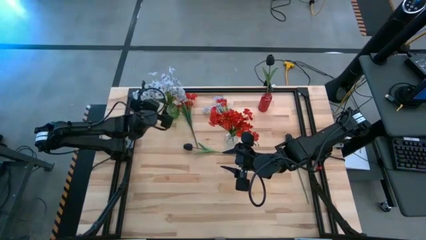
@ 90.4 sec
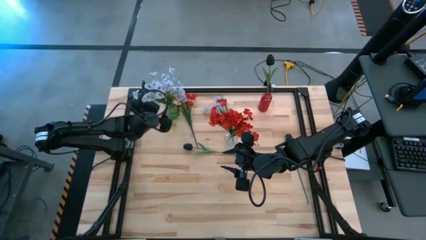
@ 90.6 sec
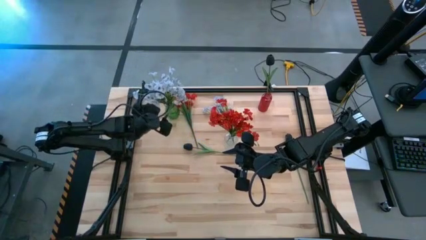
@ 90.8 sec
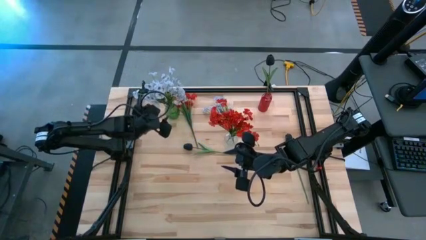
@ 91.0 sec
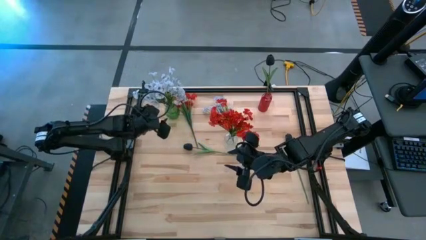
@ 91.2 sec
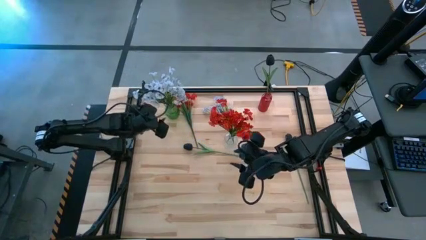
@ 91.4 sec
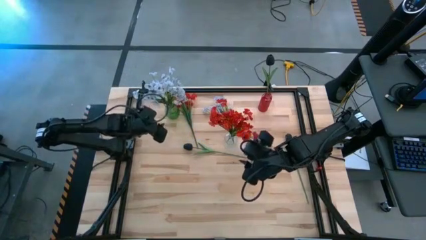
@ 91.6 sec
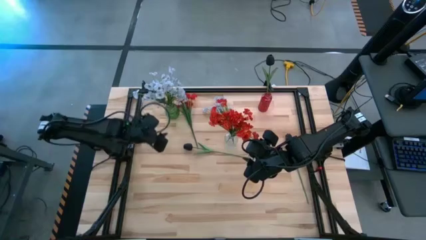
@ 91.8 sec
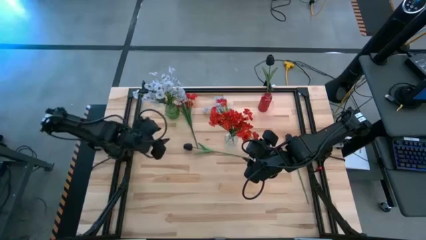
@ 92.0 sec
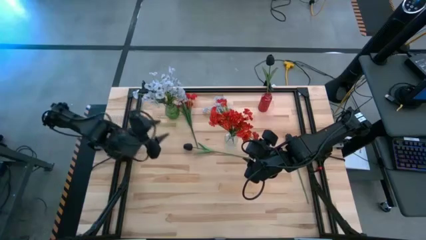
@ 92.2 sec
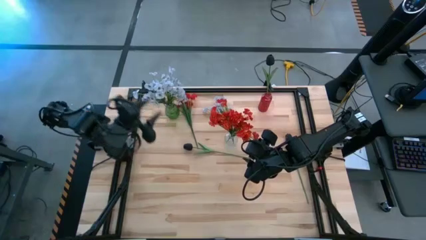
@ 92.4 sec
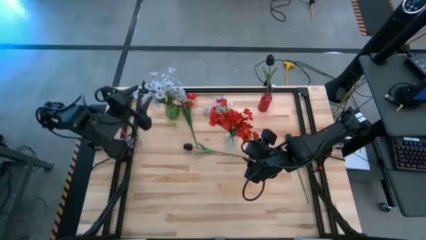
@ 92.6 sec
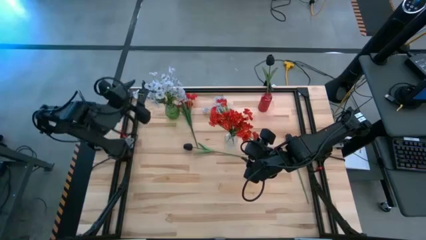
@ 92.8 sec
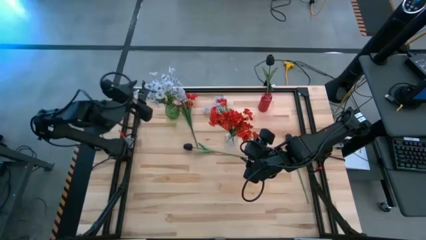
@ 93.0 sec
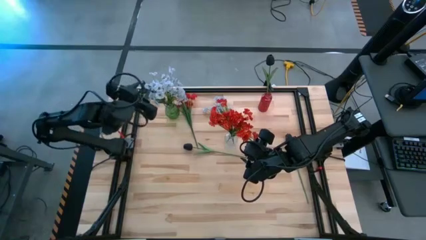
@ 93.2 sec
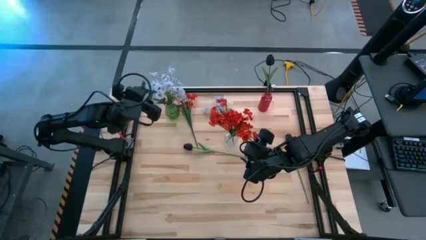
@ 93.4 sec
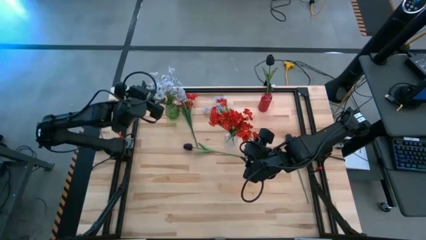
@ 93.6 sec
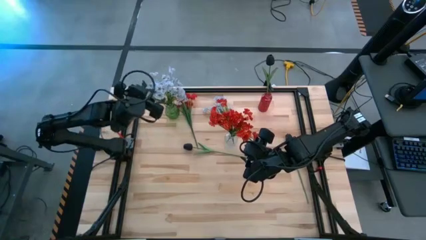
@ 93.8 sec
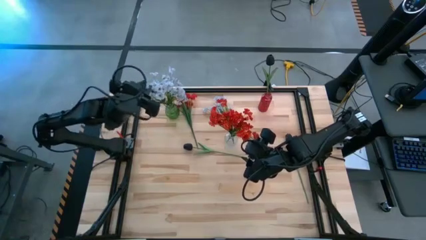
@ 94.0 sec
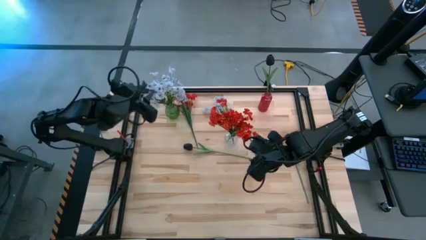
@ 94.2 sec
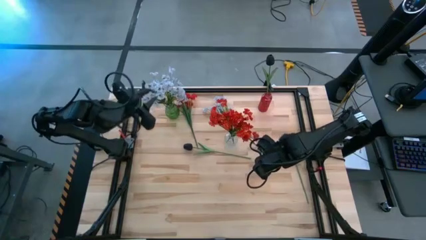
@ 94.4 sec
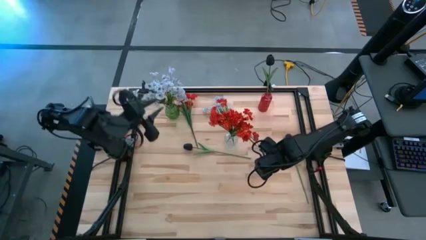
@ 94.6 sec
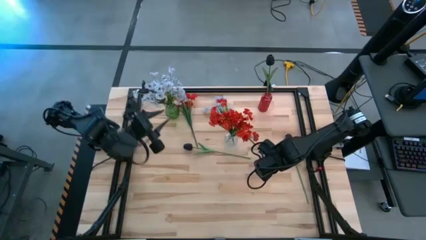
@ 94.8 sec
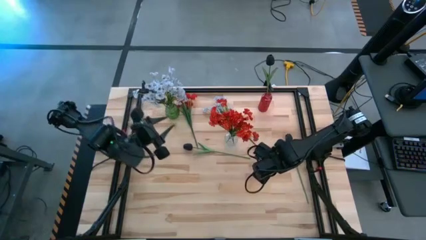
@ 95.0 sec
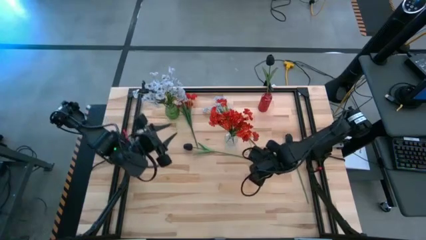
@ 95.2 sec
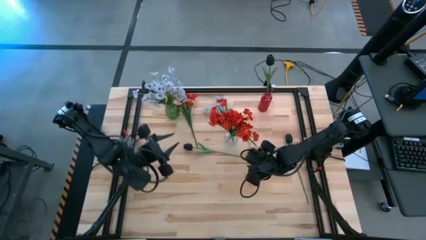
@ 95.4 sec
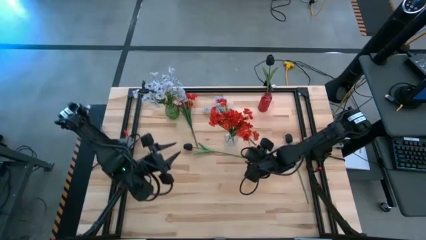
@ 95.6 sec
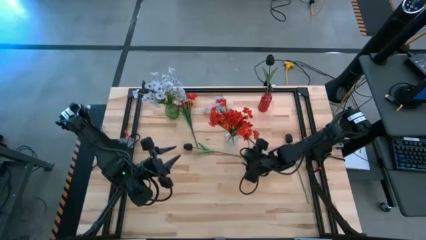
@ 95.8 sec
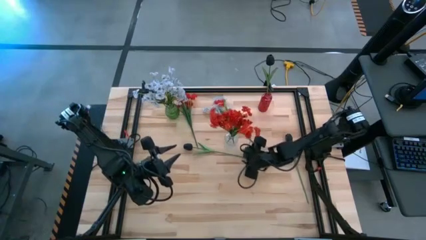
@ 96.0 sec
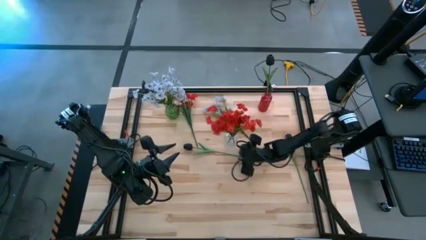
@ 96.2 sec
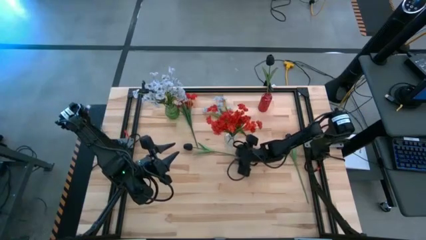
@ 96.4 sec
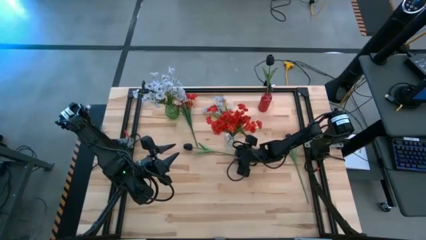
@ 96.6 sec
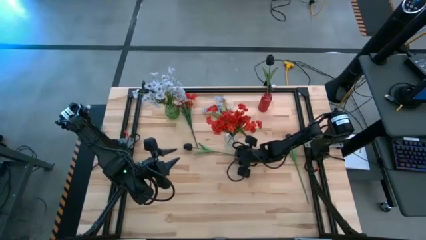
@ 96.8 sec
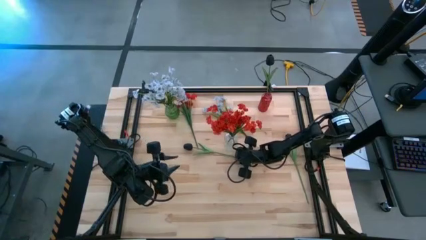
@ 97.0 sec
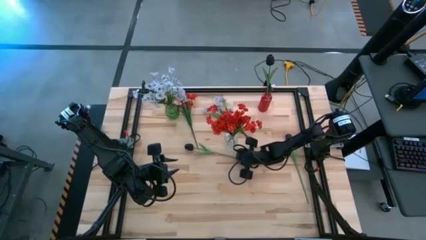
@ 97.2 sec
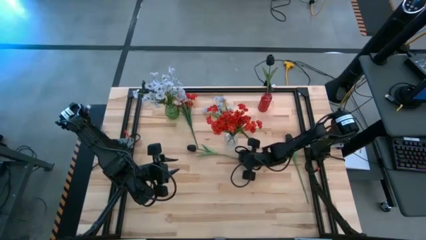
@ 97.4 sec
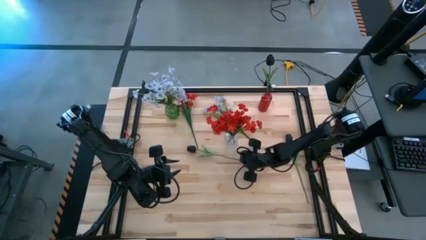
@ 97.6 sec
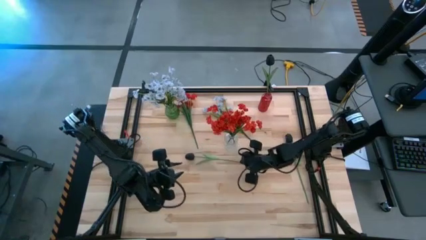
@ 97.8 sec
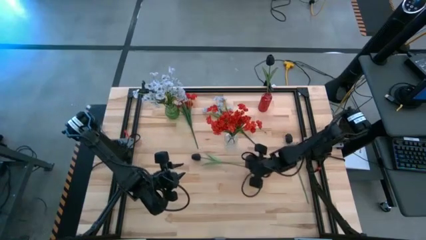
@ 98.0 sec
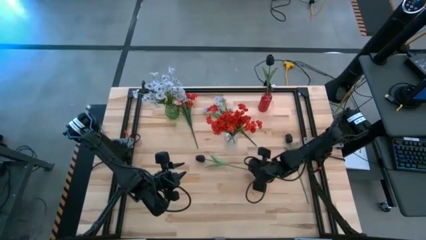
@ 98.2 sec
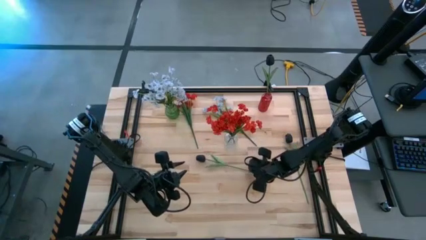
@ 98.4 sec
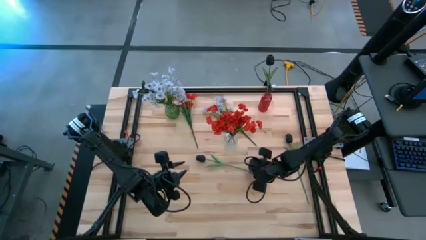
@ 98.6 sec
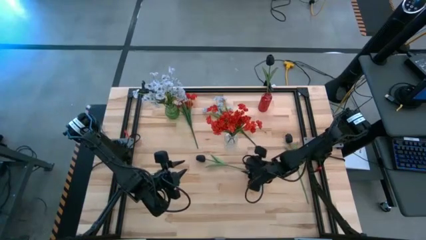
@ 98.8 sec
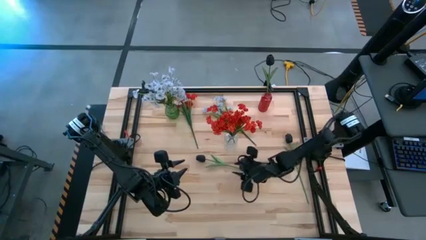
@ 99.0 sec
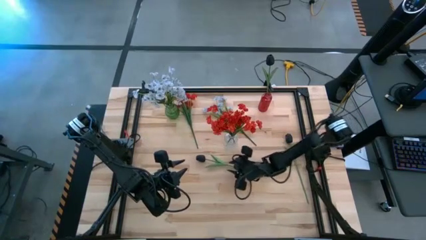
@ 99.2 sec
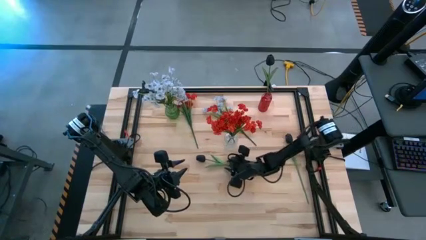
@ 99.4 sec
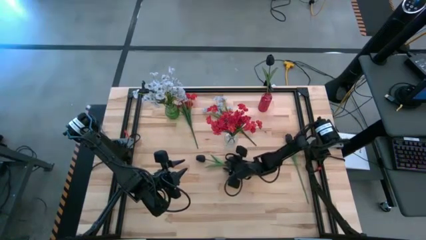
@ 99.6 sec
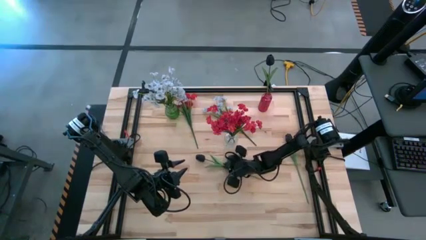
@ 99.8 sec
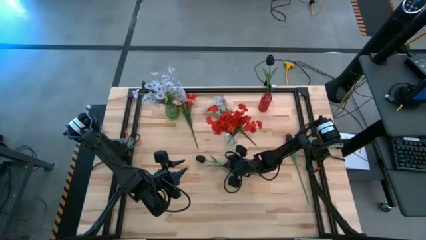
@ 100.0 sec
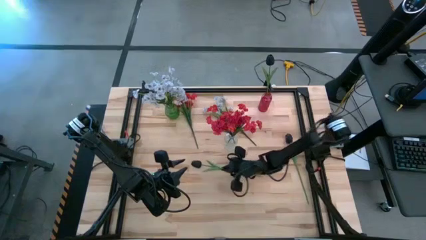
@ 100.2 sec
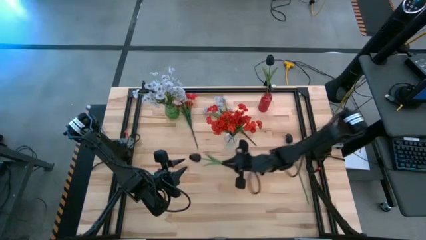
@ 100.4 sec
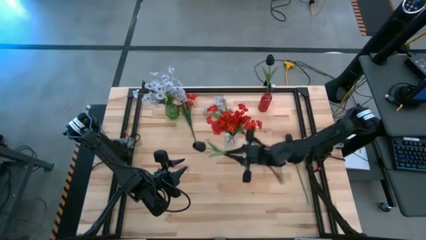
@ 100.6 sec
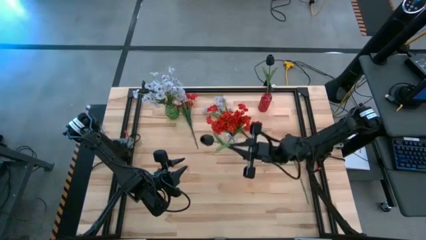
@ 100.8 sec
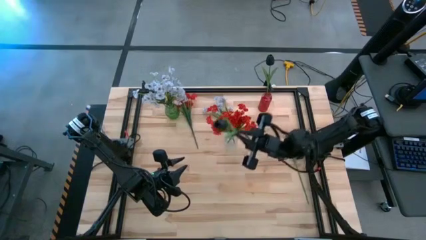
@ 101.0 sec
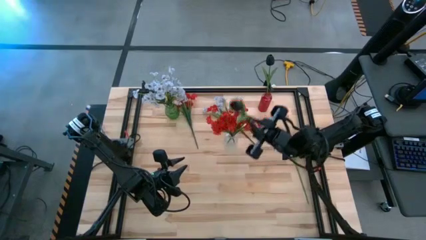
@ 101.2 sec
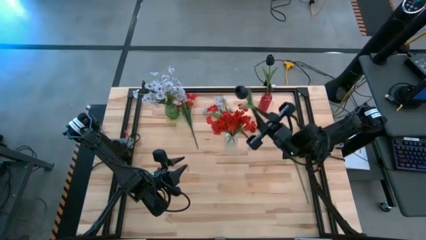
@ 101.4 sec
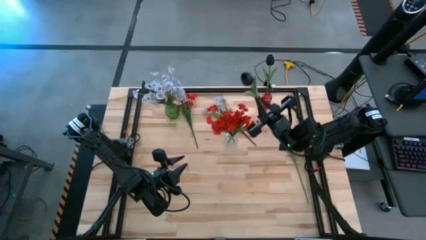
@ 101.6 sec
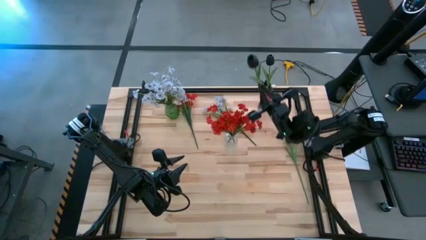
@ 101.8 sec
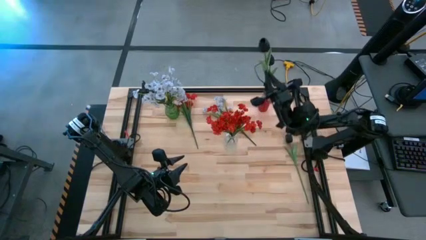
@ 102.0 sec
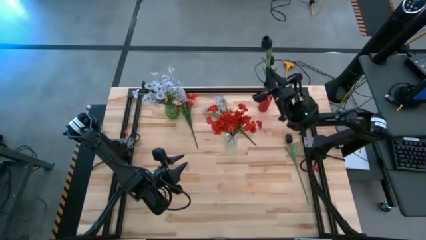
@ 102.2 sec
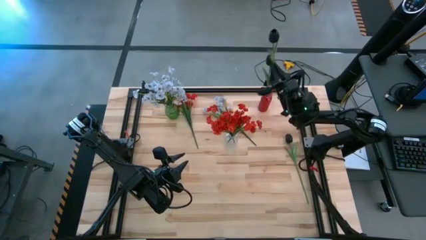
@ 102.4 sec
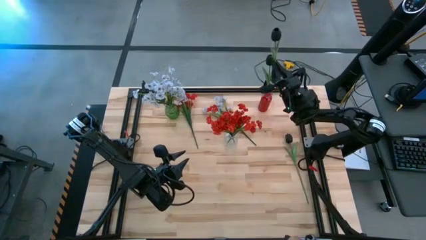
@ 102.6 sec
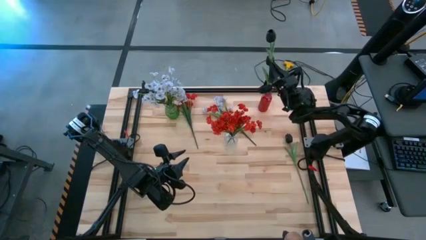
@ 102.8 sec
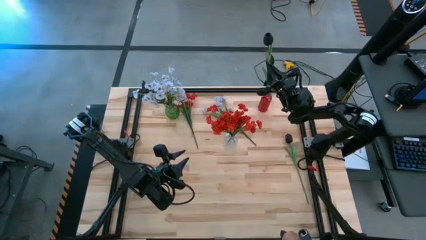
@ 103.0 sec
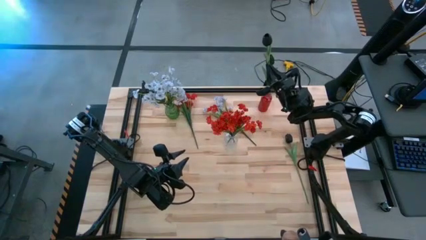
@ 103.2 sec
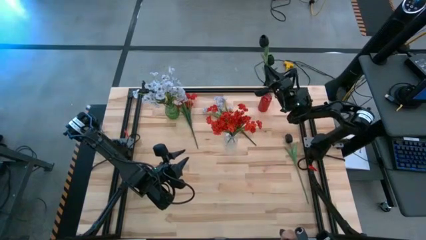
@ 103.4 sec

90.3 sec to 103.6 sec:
Task: Sort flowers into vase by color
Put the left black flower into the red vase
